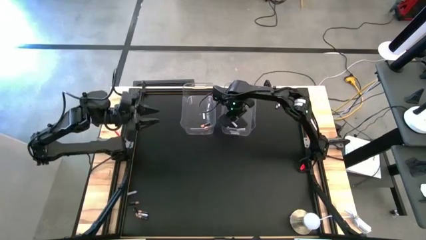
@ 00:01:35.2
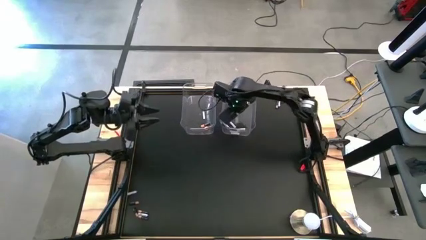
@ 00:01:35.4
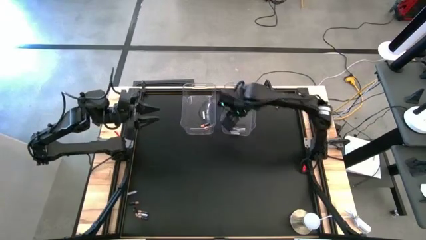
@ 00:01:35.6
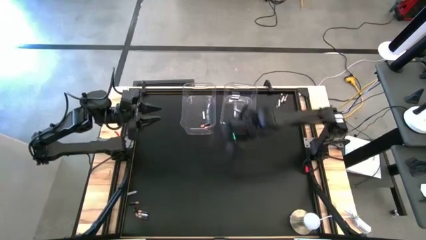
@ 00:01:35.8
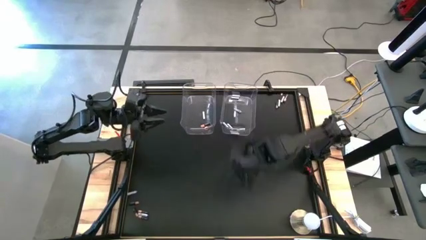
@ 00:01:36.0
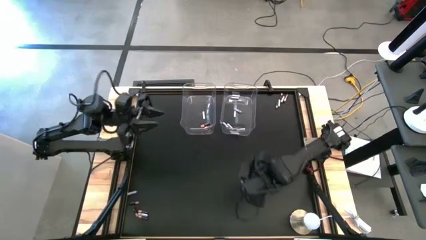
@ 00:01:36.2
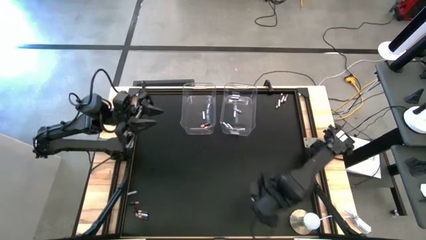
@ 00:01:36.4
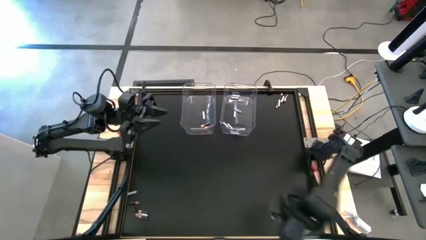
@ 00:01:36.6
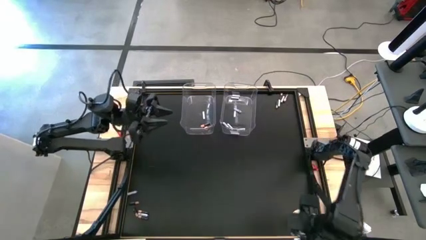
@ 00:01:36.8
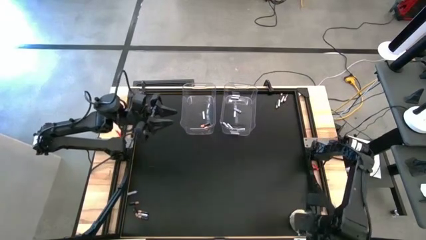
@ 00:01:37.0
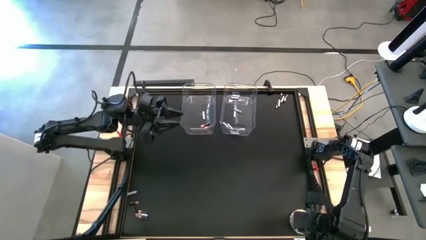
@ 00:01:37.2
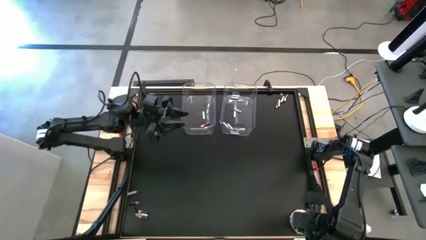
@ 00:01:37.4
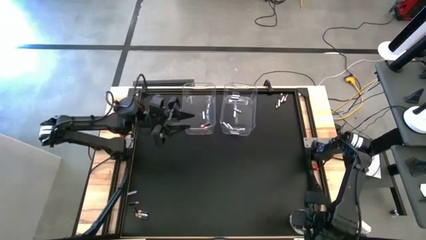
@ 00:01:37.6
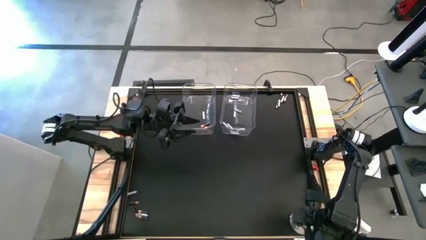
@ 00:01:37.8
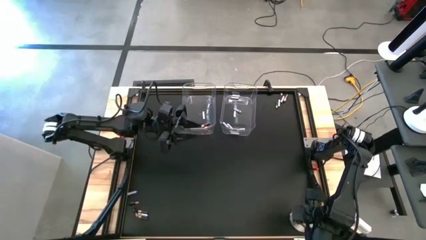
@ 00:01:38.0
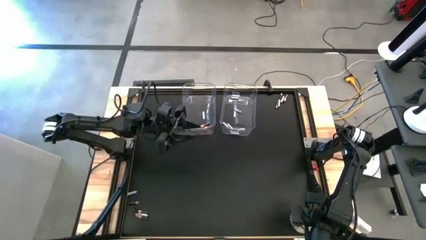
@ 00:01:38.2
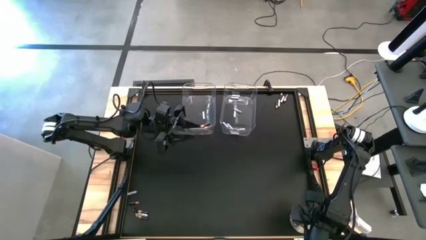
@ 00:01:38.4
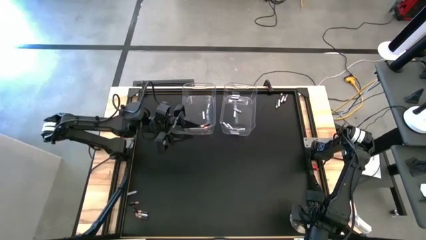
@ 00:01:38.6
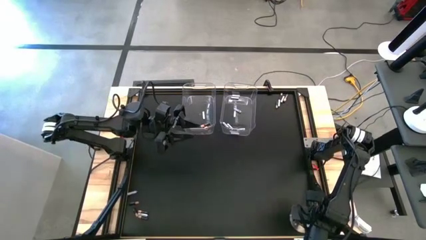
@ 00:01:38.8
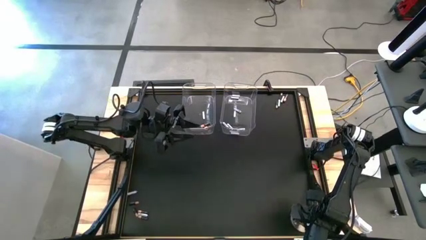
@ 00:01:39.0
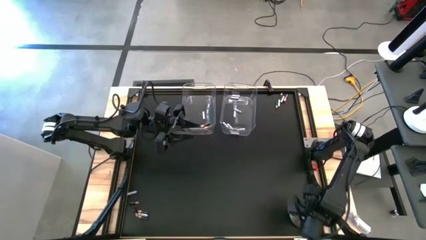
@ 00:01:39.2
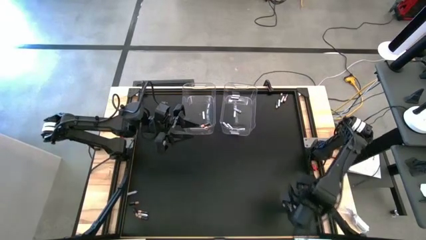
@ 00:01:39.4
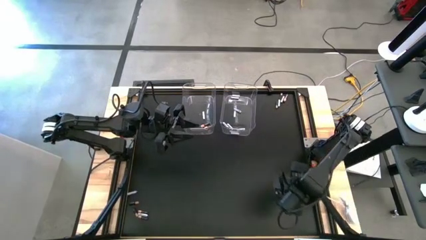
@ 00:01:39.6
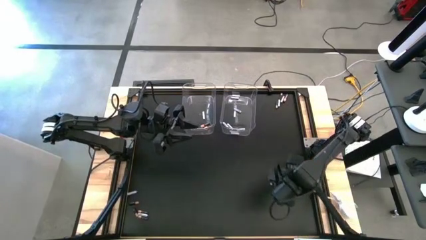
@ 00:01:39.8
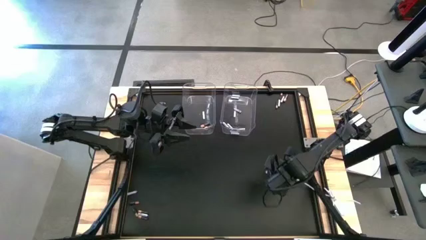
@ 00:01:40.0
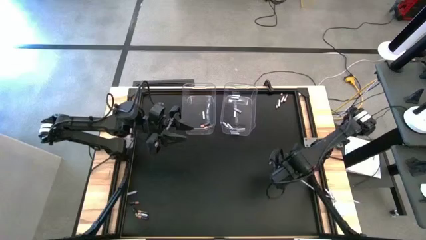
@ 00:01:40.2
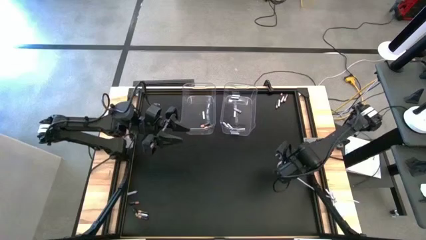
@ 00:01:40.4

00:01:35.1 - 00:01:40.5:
Task: Sort batteries
Move the desk lamp to the middle right of the table

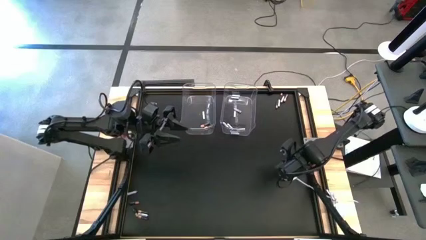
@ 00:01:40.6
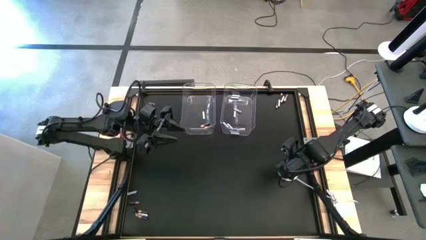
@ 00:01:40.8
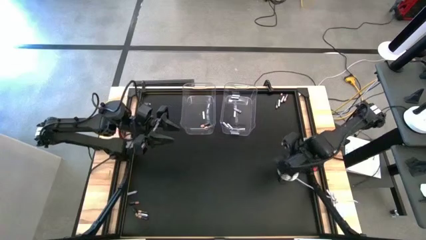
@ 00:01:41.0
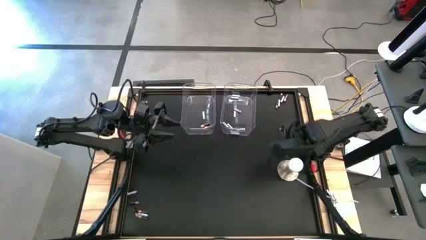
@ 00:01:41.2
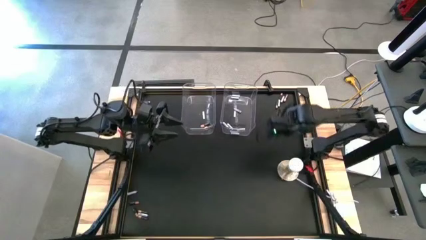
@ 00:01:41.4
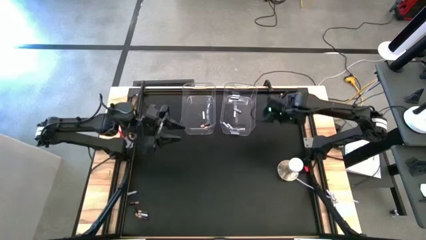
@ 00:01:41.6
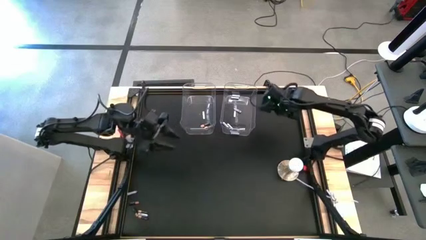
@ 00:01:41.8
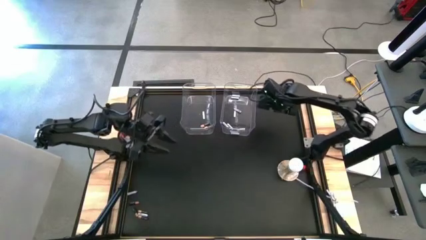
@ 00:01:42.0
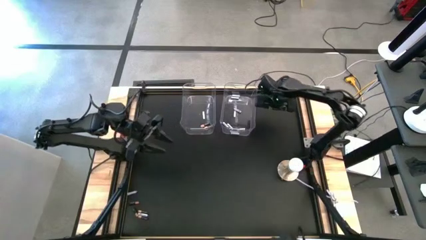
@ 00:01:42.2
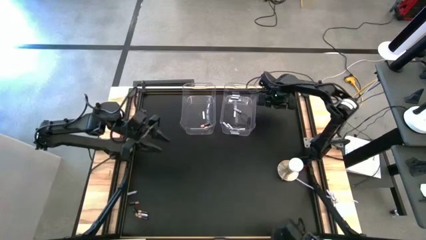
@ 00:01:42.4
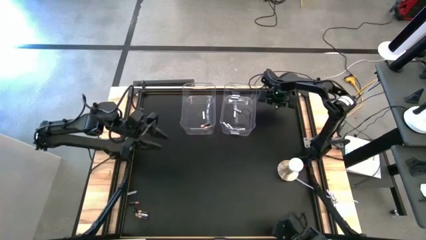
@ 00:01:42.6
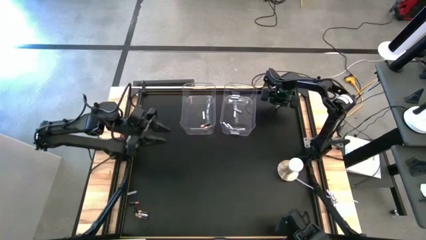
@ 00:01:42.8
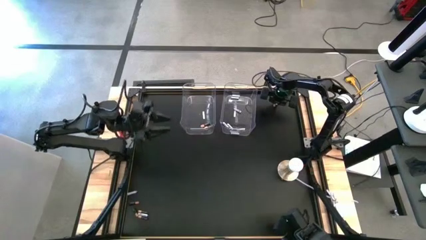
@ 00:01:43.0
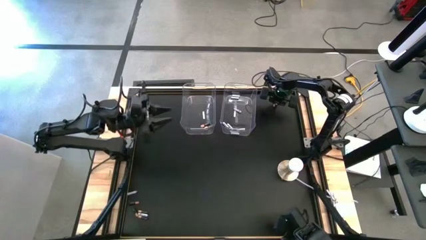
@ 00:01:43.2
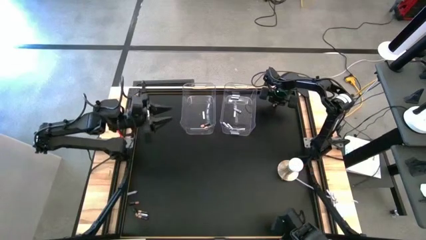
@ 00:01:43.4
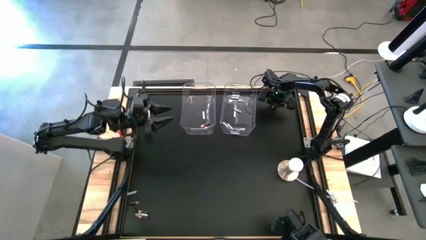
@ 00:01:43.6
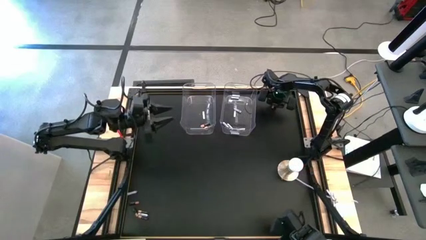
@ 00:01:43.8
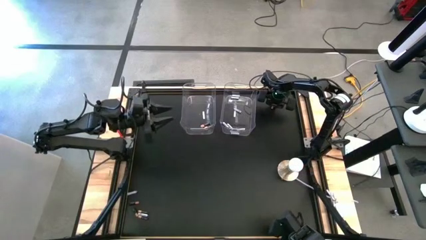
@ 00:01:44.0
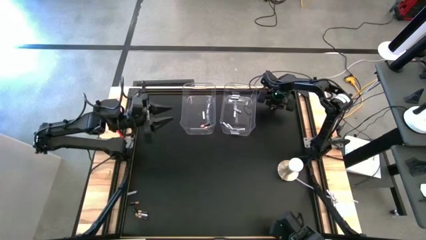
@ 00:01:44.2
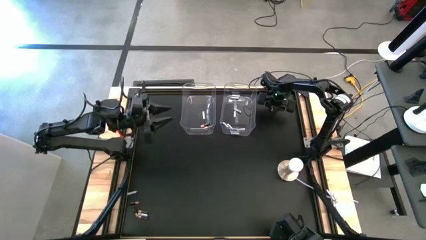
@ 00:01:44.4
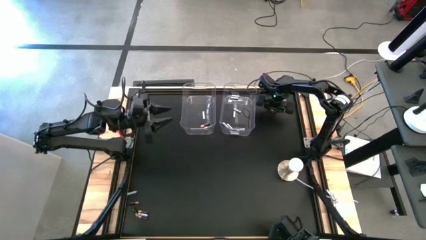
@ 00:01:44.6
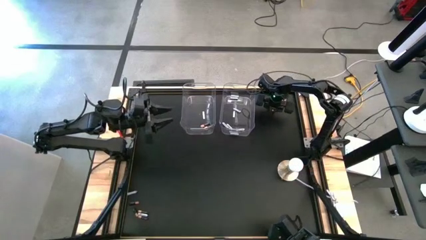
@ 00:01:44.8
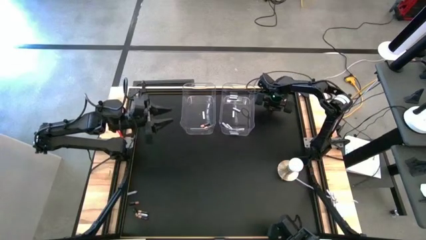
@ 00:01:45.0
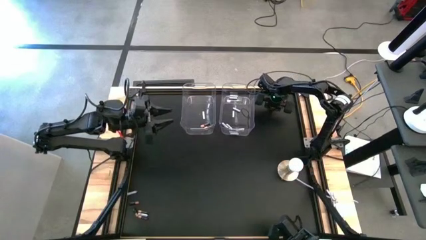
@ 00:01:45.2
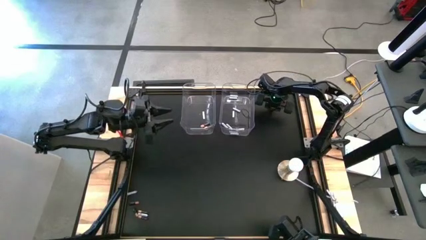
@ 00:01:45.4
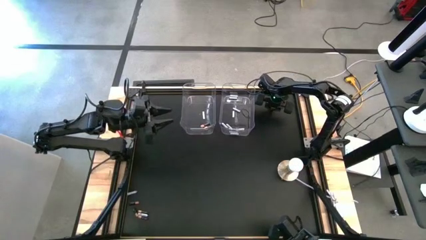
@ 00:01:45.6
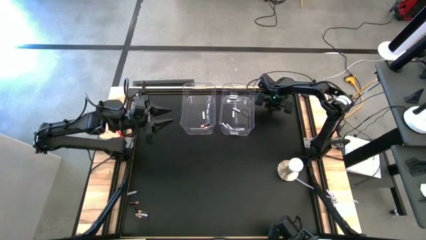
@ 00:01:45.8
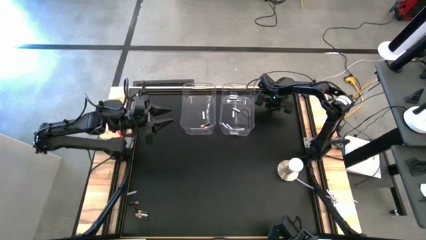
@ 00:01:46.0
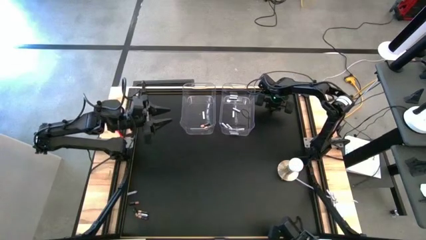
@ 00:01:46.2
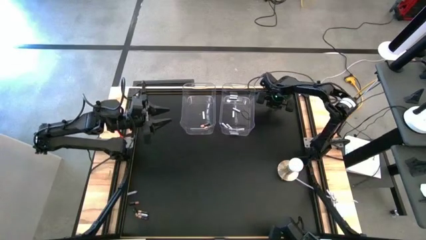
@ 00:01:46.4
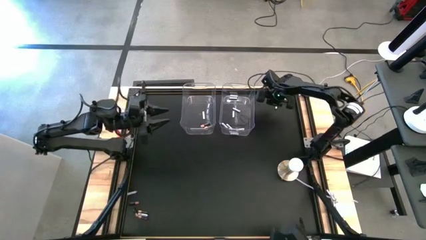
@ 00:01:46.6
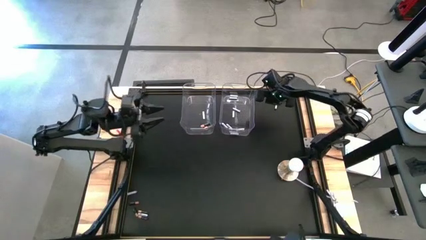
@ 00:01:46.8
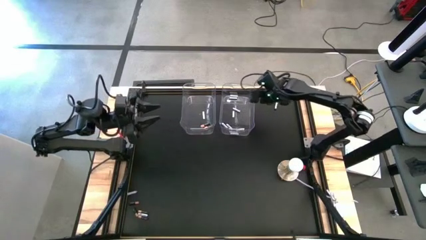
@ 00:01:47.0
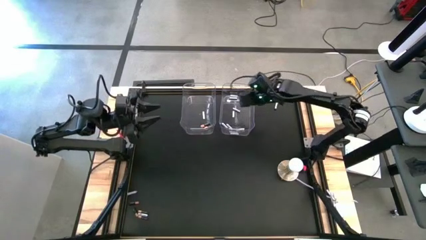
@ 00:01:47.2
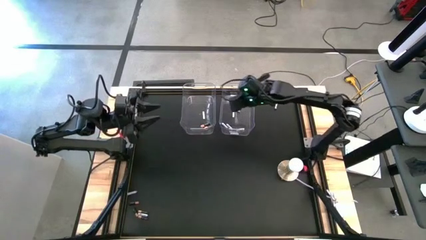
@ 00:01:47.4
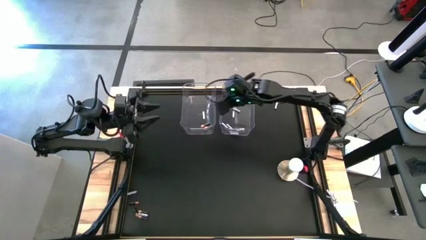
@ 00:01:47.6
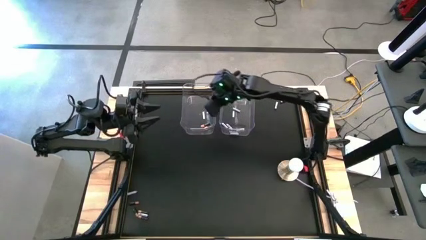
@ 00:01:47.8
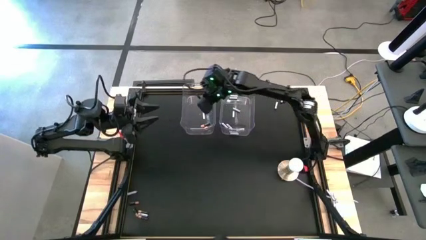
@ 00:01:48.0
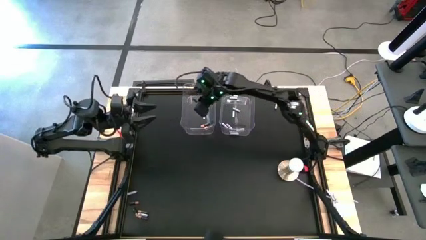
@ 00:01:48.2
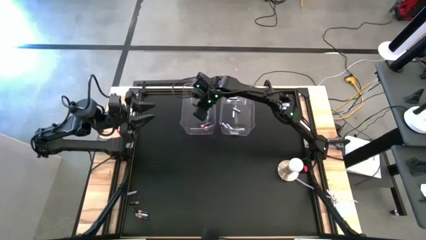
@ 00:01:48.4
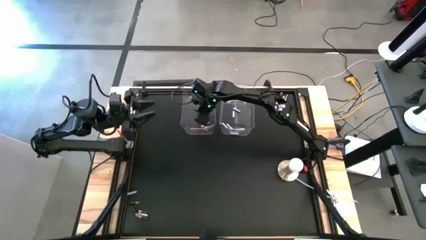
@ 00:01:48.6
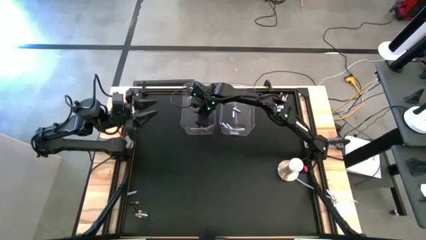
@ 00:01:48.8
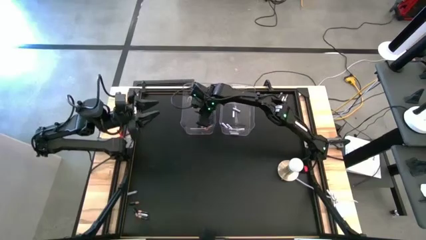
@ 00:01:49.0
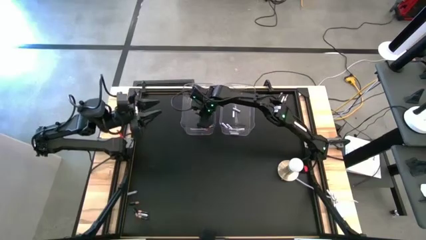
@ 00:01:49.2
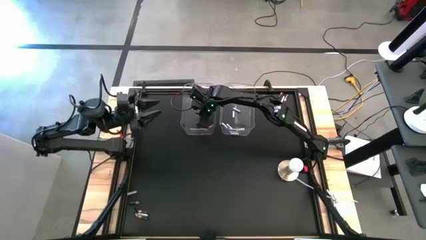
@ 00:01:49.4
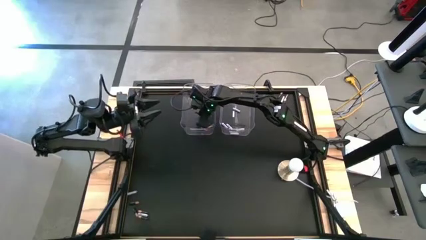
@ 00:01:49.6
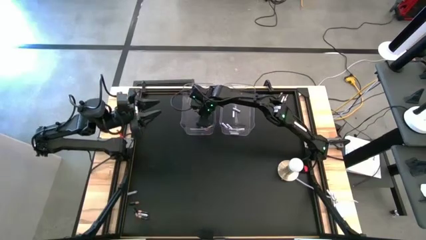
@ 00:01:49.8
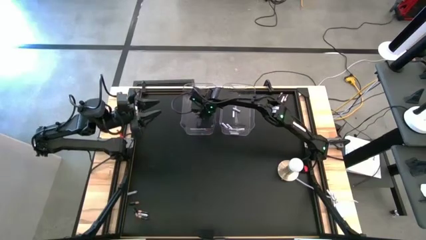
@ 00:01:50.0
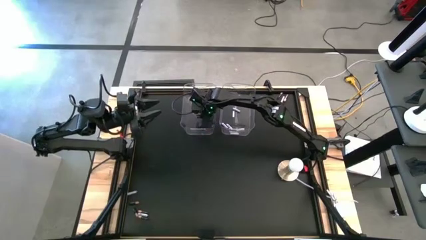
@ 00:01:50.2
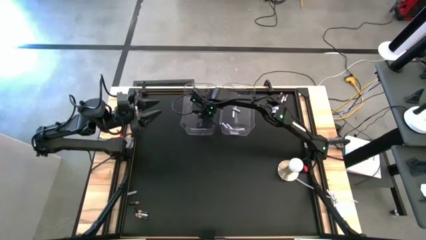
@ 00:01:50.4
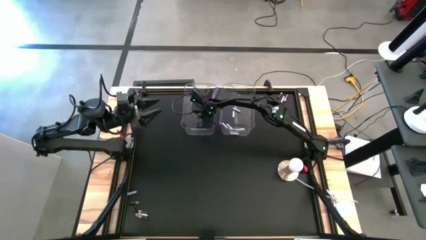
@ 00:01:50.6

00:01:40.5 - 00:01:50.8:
Put the black battery into the left transparent bin

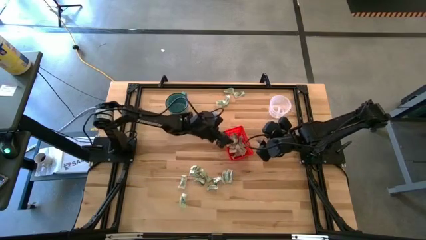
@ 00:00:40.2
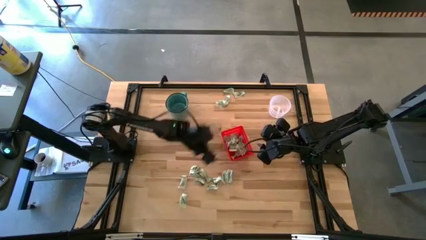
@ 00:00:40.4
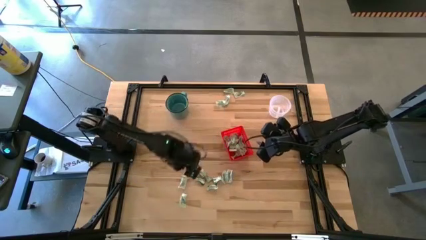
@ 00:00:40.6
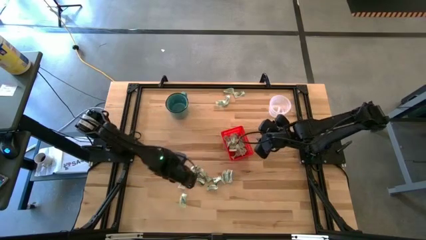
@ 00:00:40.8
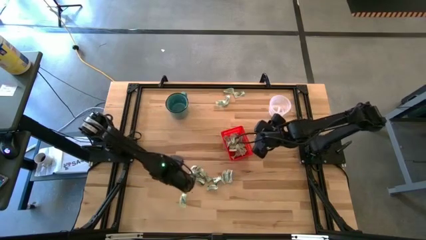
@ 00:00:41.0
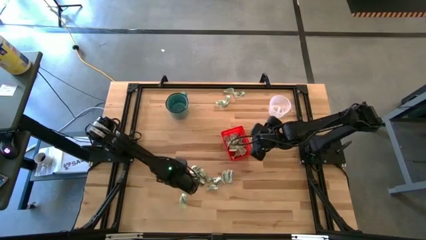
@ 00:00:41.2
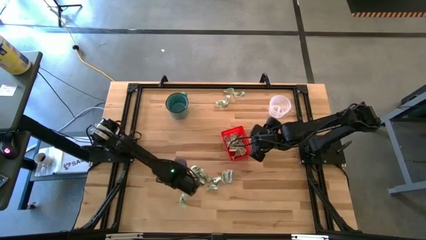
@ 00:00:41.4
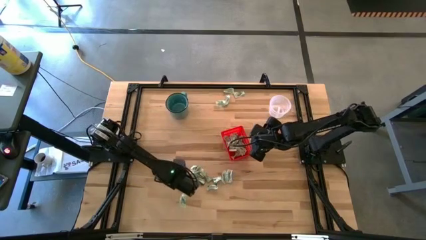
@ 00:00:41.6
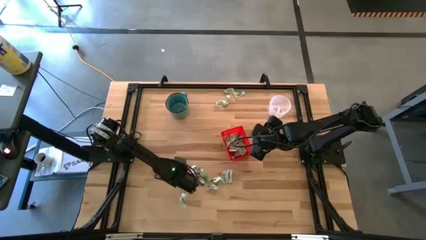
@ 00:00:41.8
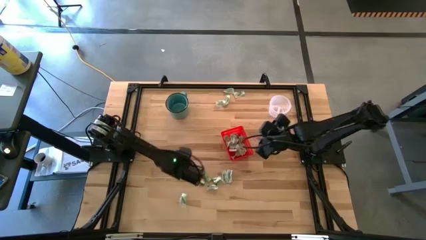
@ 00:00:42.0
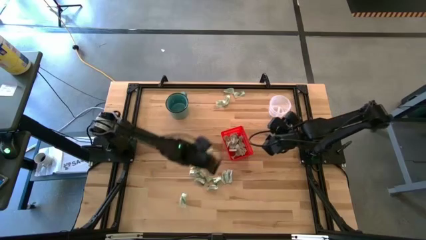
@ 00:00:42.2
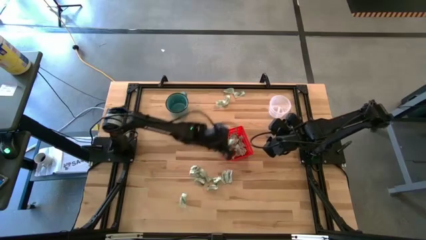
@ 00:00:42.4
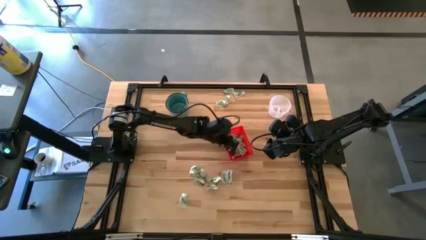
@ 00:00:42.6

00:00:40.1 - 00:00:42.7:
Task: Pick and place items into bin
Put the stevia packet into the orange bin
